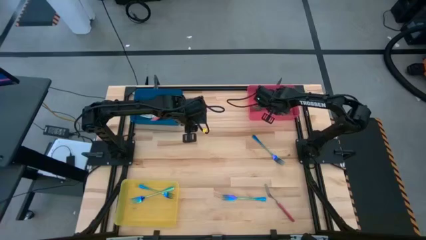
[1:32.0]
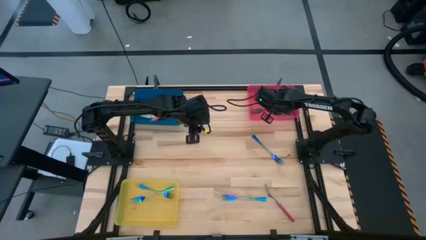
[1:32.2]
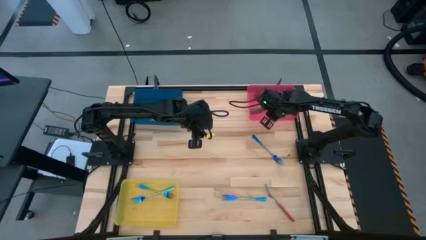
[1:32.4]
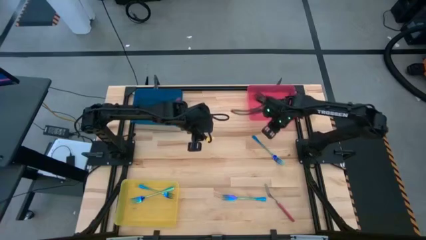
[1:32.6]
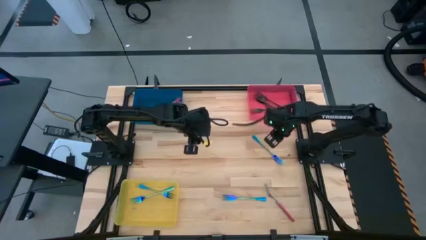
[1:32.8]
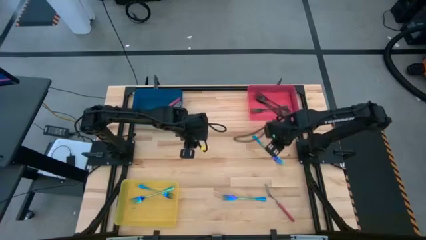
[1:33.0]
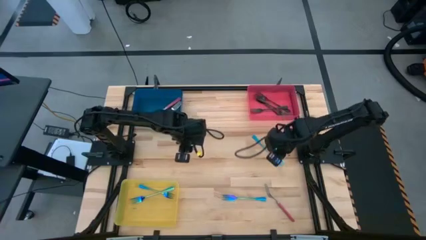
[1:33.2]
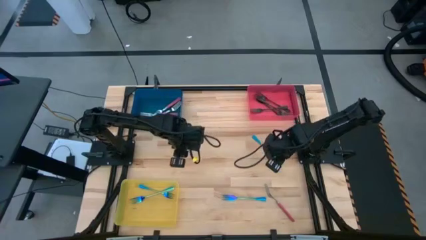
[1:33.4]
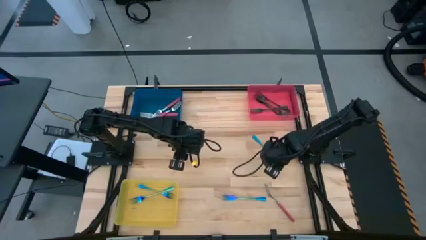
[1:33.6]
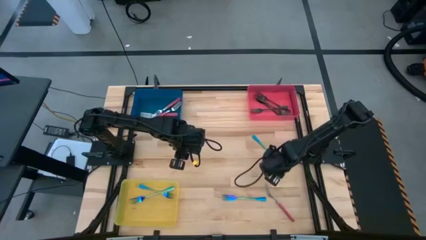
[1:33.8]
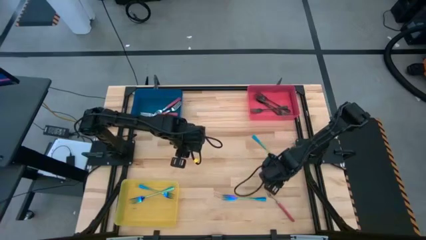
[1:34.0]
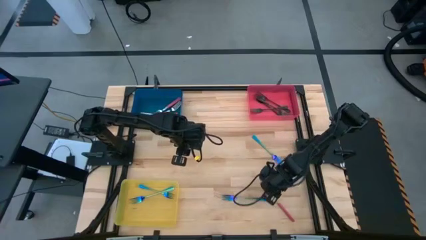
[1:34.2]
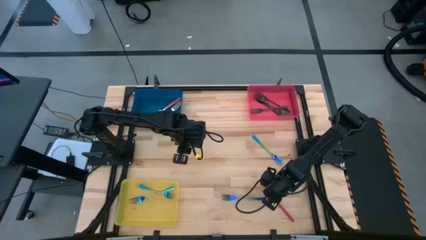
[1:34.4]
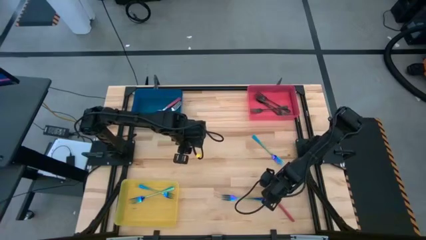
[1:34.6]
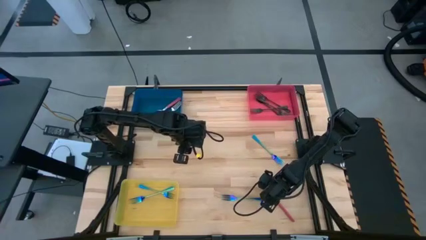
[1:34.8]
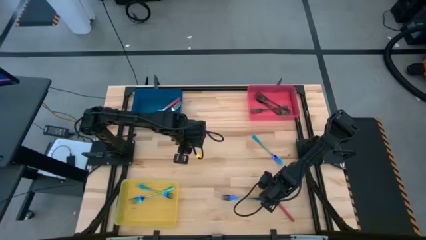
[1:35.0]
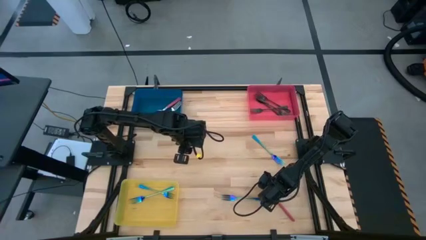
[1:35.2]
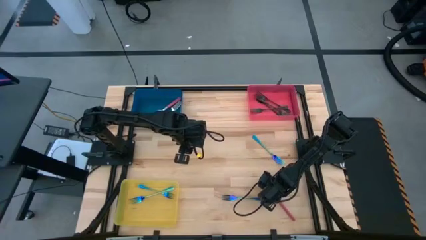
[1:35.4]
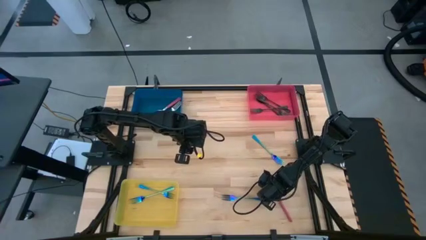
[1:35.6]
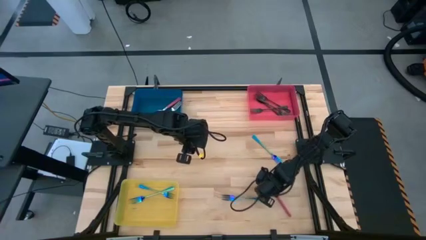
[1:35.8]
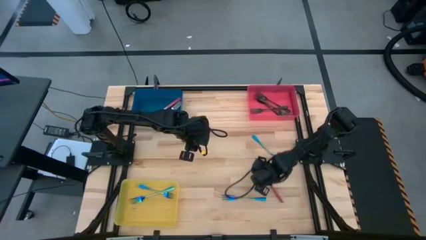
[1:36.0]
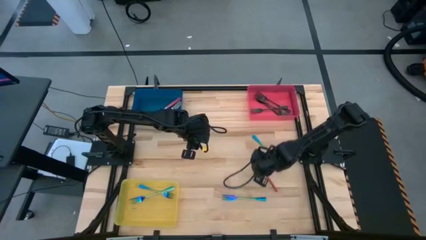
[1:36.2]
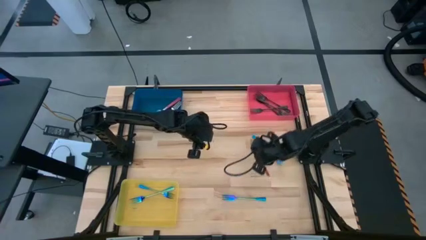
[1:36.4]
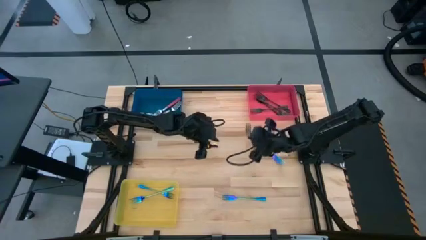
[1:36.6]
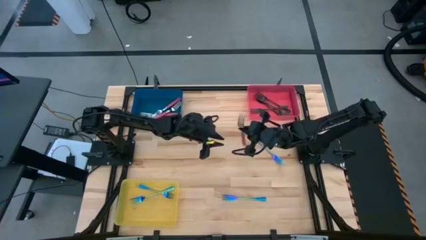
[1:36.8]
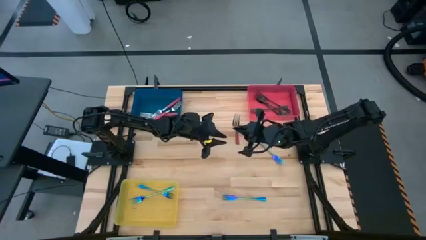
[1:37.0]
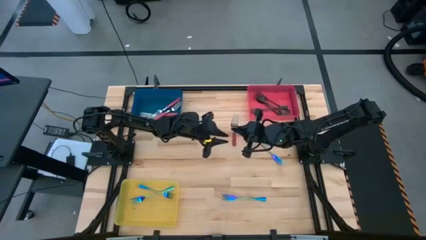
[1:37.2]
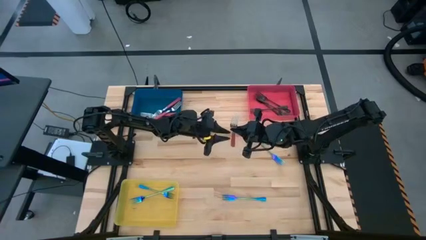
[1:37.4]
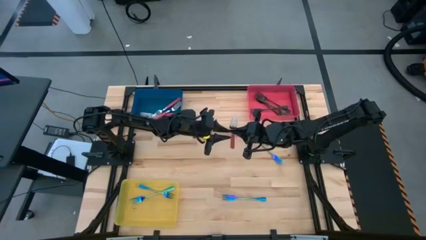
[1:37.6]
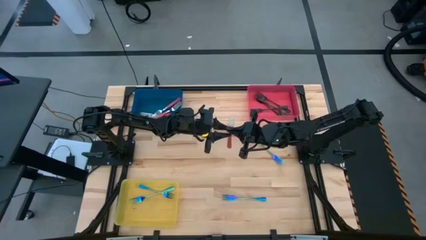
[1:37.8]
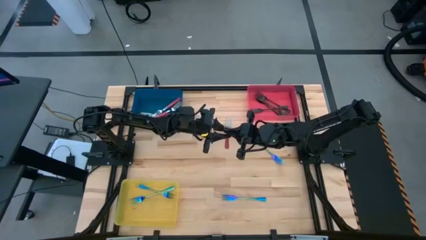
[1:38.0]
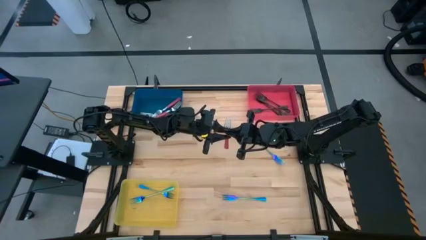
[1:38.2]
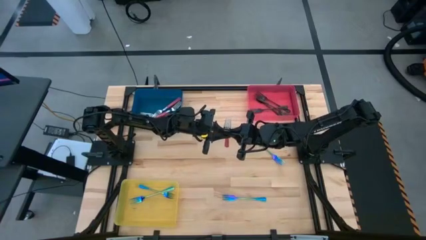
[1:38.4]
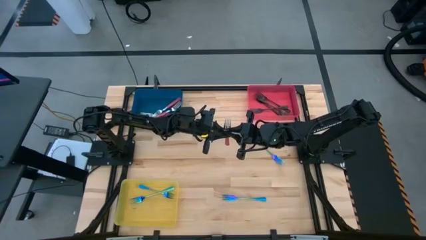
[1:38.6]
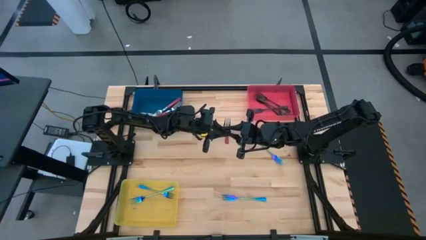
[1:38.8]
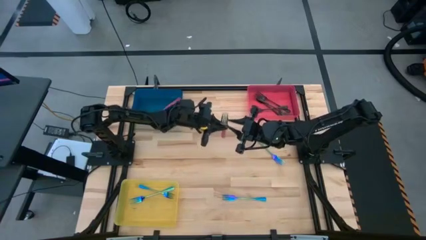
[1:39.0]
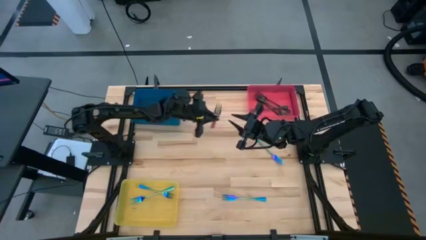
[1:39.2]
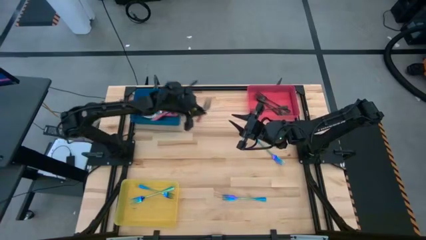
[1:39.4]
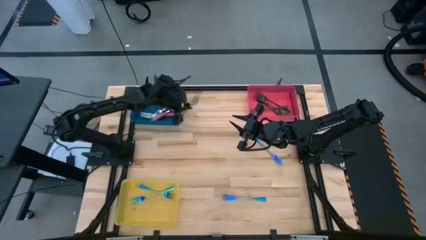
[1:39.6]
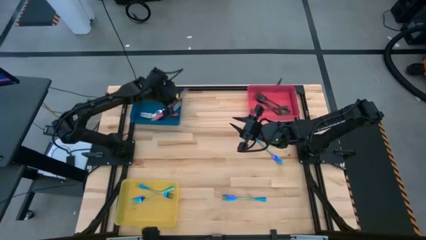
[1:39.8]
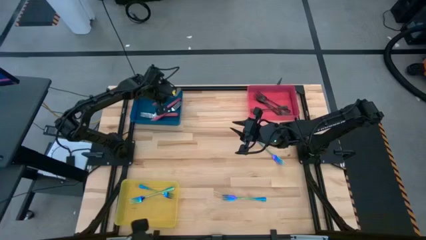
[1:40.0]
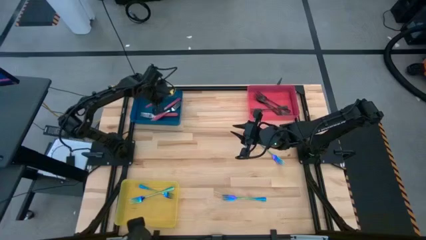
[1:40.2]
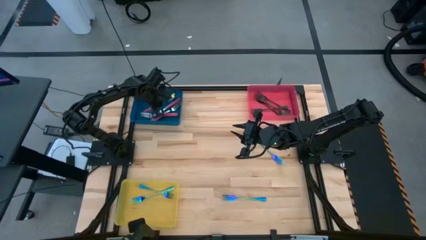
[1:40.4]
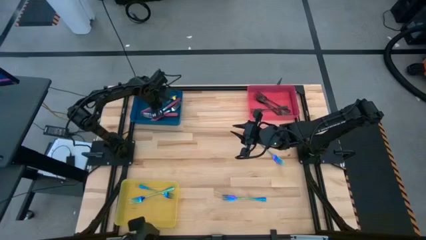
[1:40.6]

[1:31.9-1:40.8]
Task: Sort silverware by color (type)
Put the red fork into the blue bin

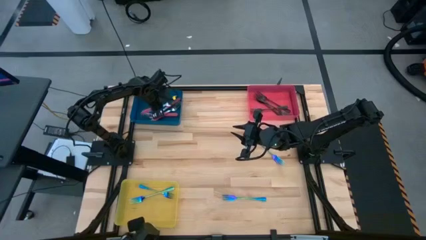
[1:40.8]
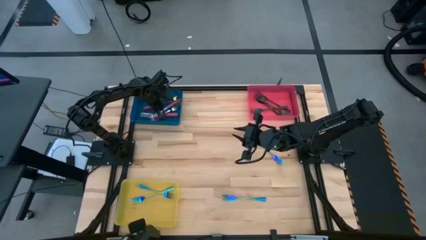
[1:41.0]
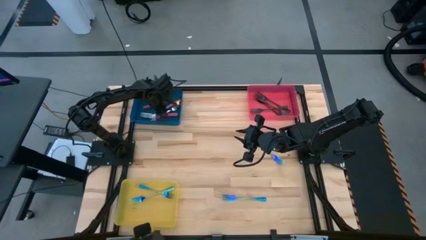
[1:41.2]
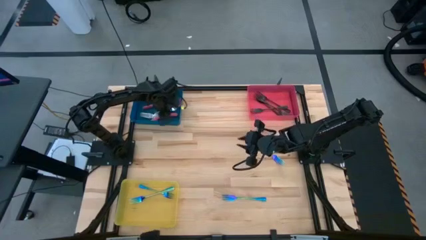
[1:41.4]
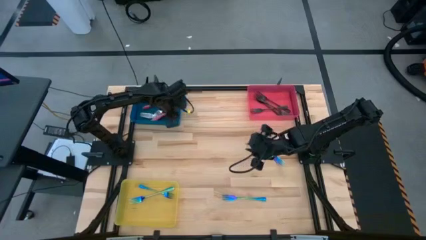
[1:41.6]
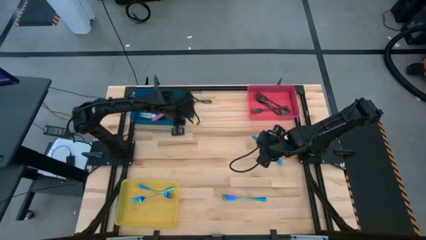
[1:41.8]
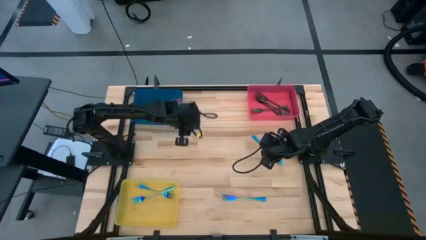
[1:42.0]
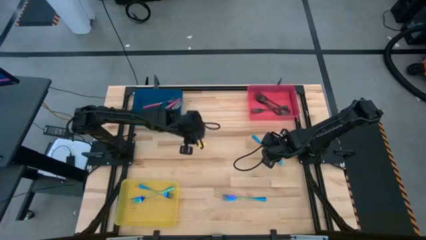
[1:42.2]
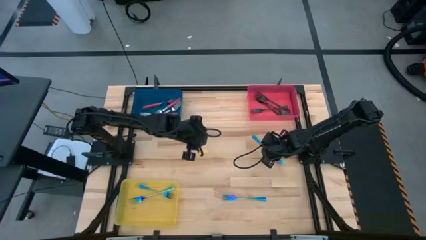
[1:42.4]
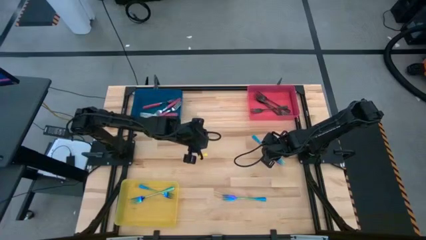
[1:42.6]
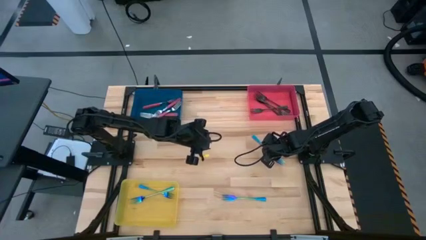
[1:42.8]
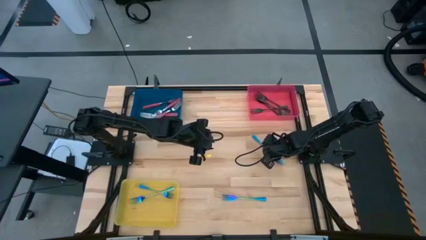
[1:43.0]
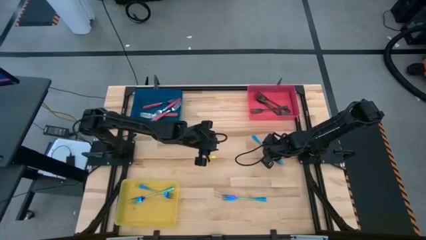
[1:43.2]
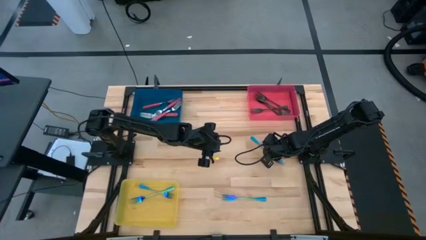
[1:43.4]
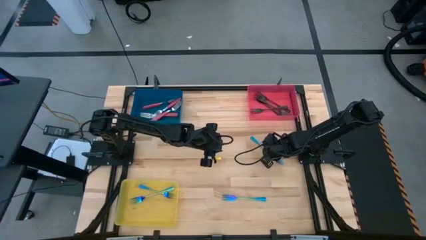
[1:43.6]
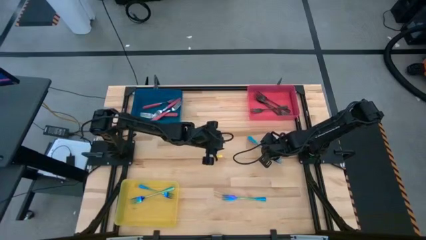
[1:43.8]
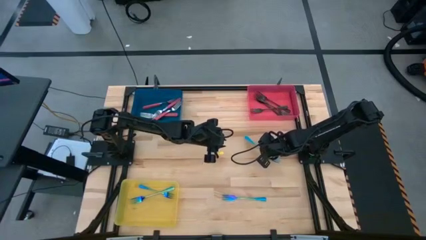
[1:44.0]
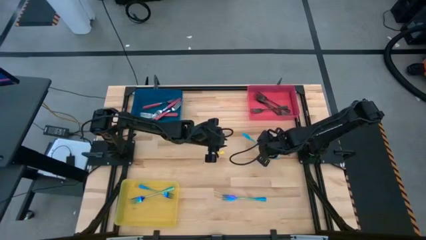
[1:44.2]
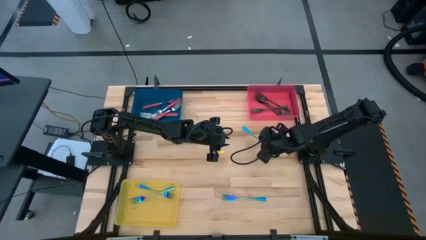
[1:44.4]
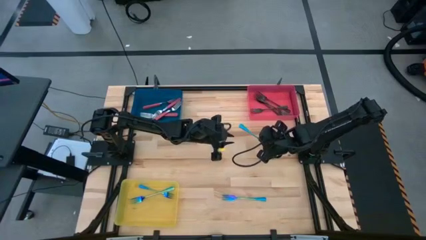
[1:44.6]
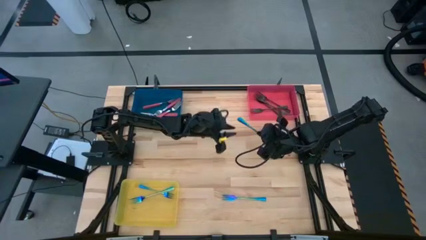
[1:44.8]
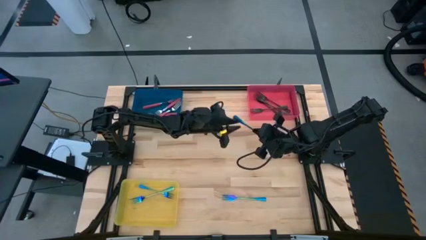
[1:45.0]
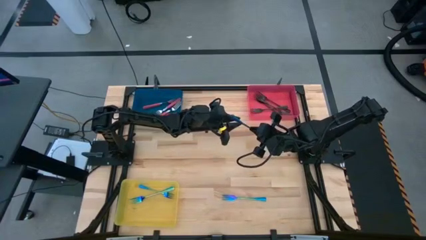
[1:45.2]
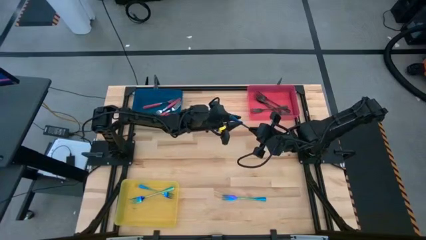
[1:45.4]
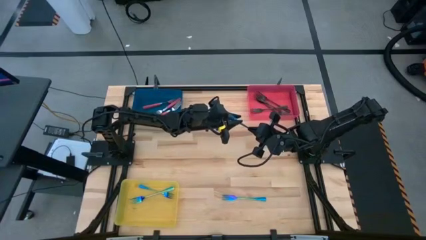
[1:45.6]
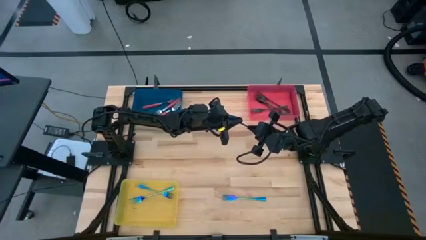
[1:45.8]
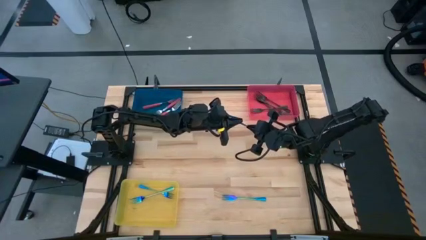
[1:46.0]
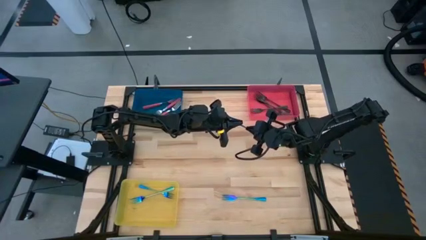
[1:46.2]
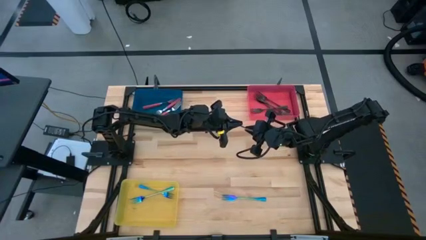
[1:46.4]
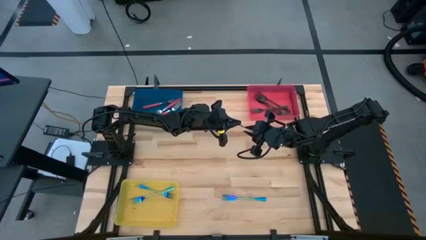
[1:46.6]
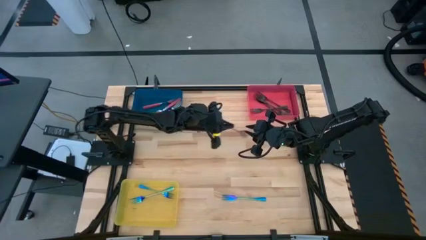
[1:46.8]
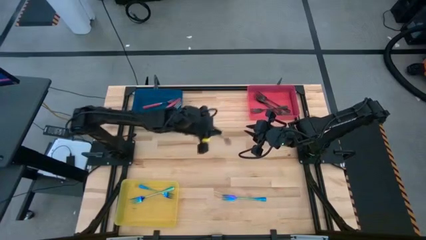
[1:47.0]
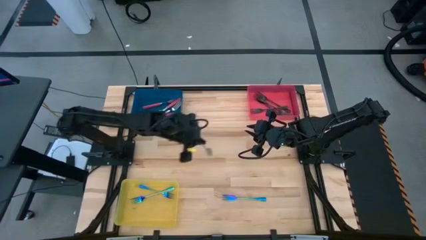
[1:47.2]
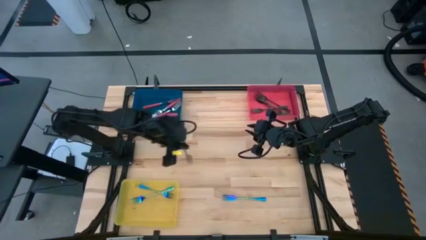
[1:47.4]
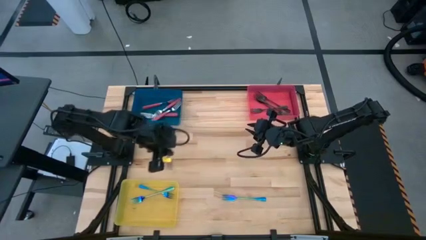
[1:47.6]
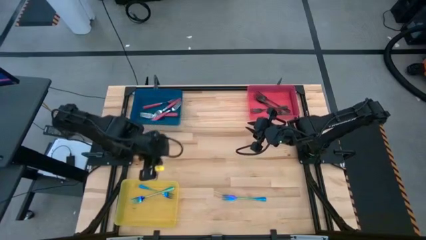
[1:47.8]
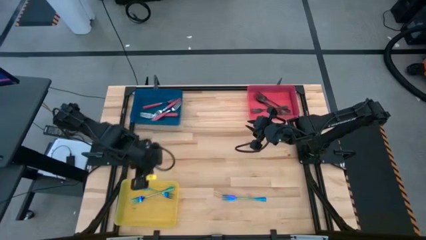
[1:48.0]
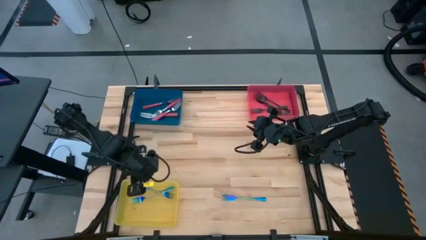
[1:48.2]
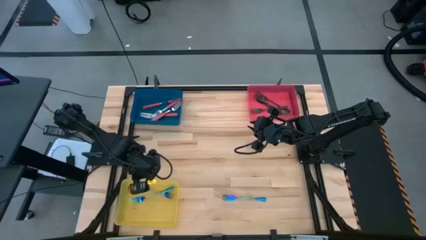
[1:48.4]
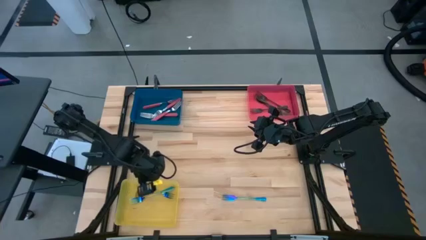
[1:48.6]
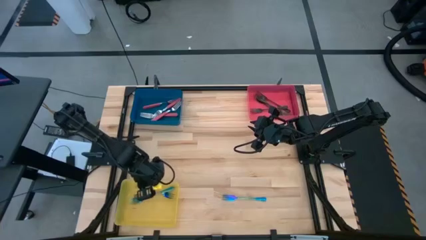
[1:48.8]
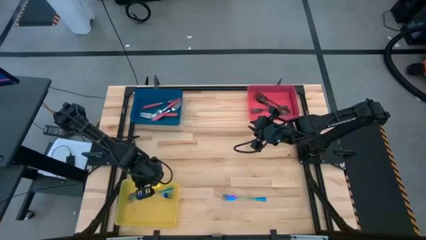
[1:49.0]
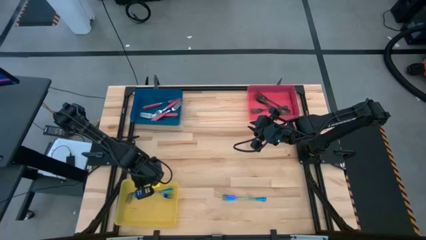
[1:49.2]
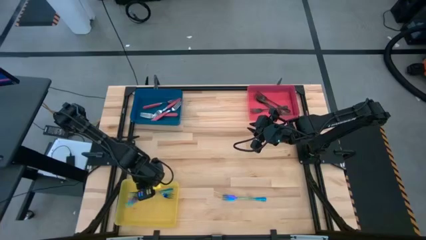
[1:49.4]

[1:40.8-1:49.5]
Put the blue fork into the yellow bin
